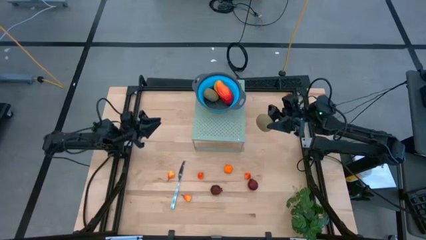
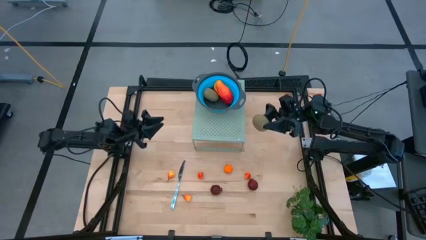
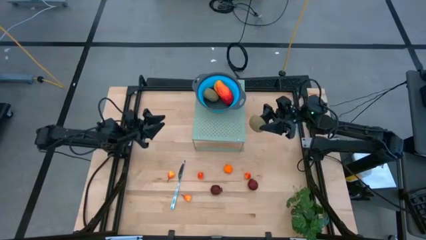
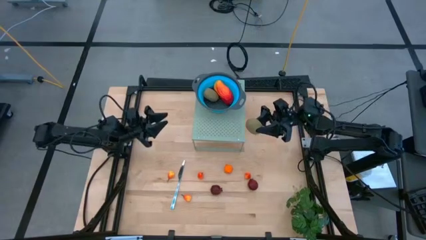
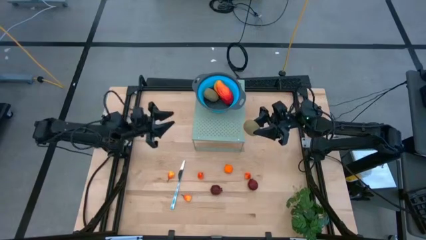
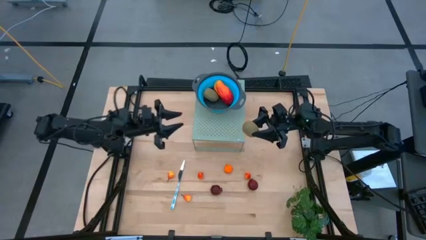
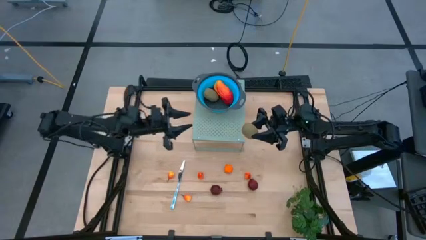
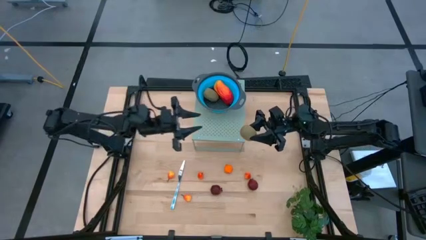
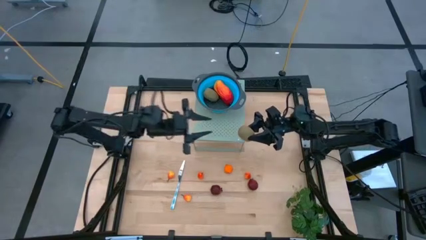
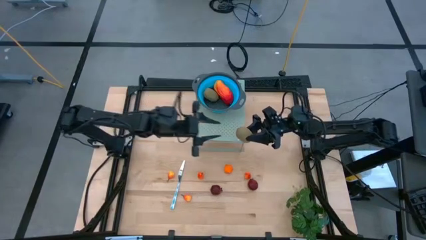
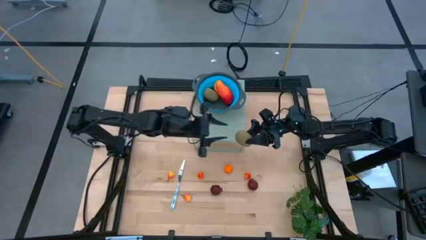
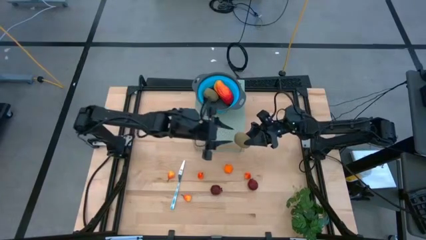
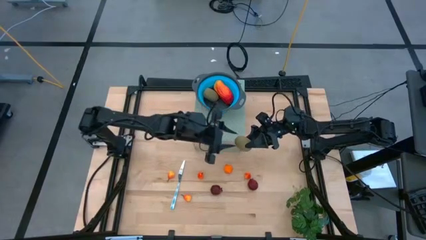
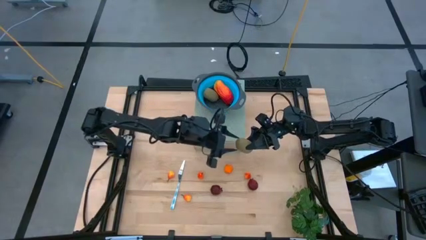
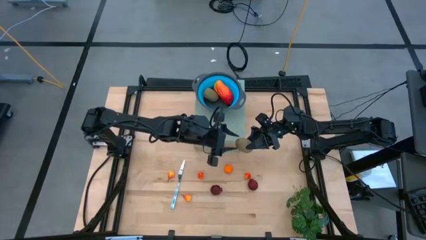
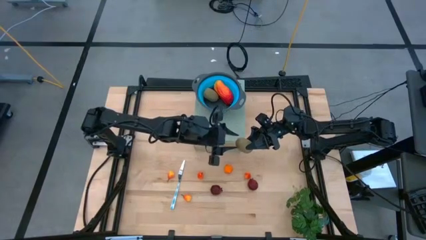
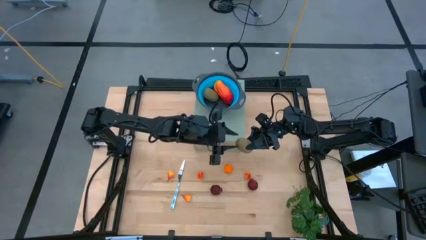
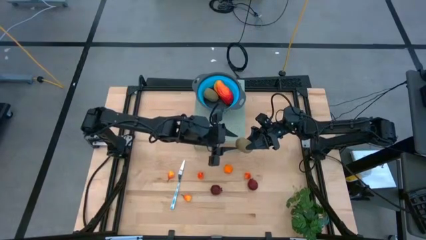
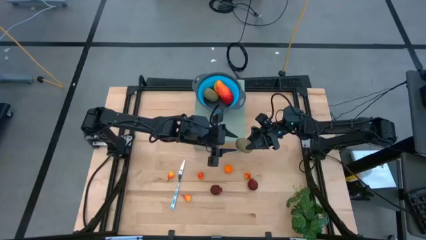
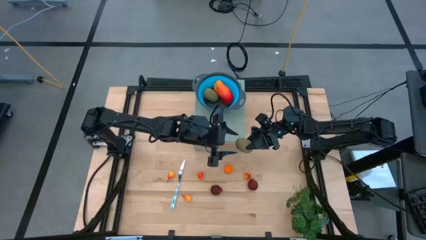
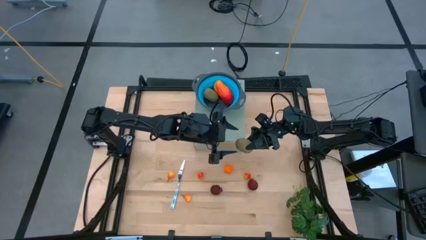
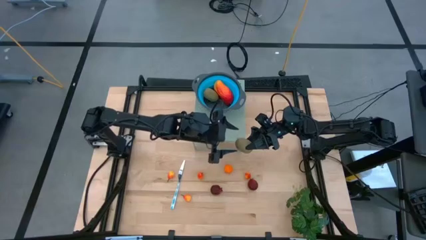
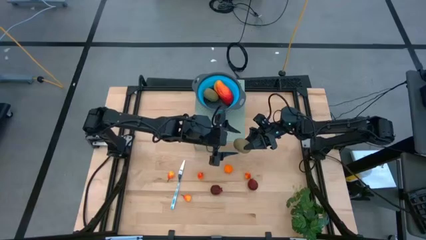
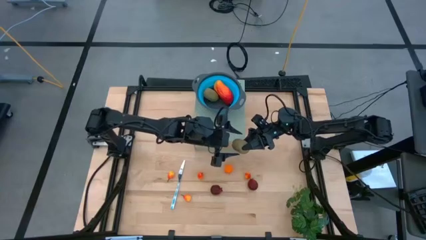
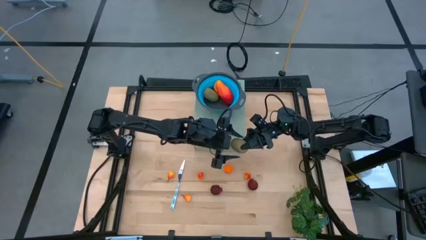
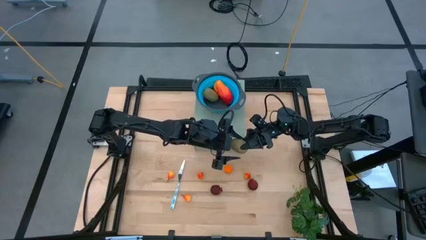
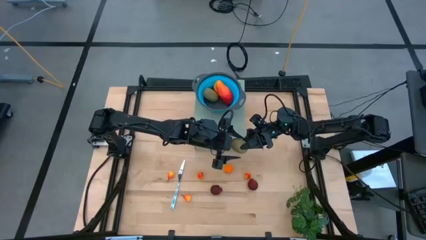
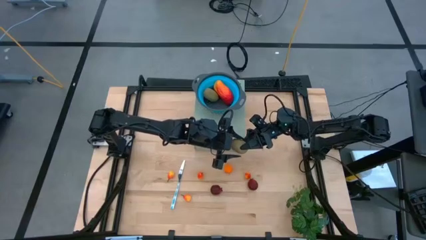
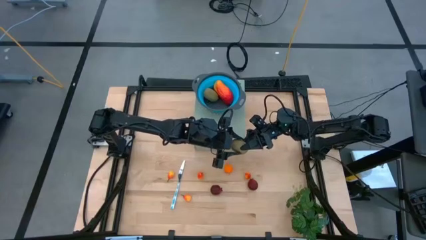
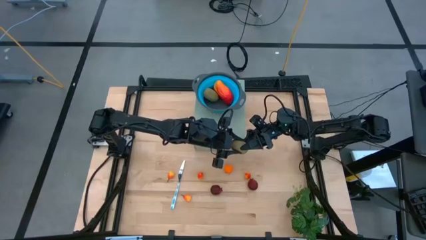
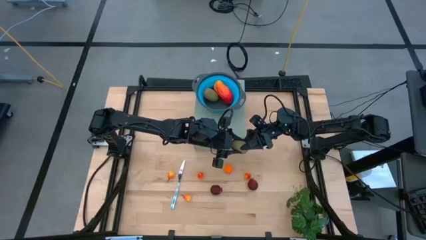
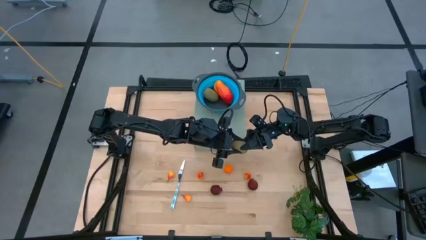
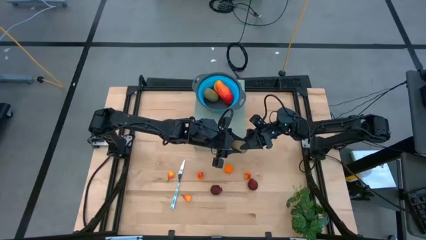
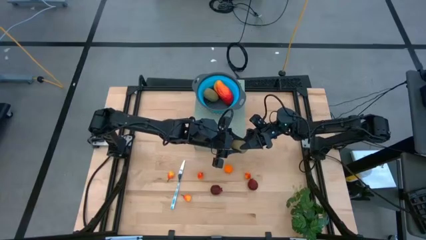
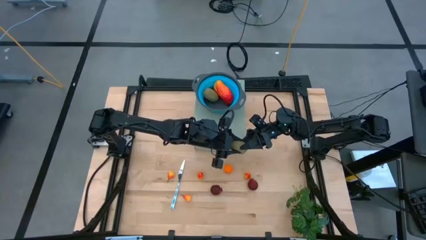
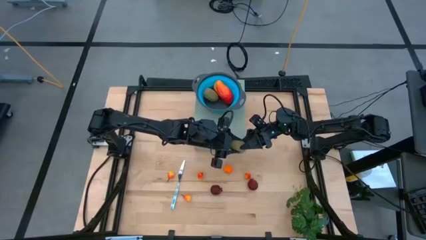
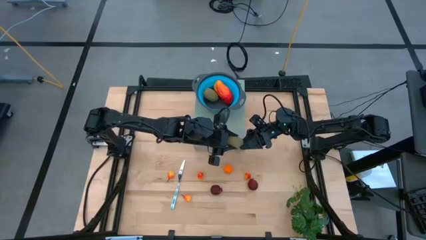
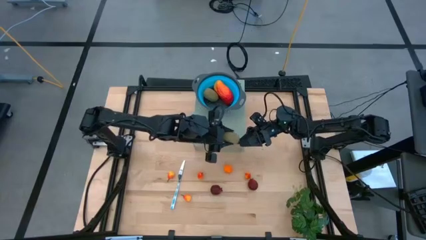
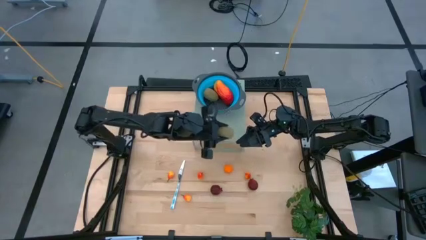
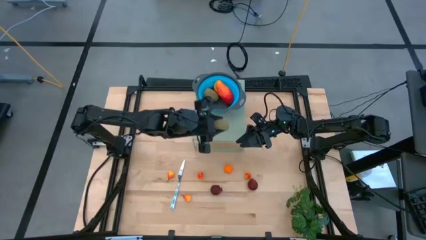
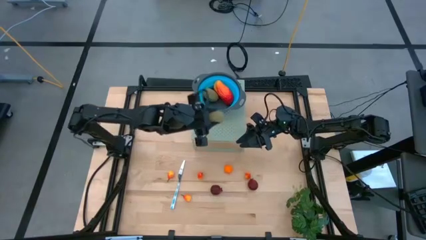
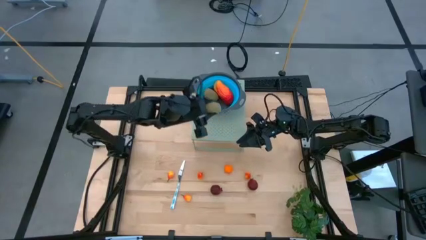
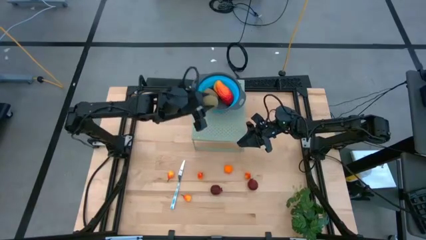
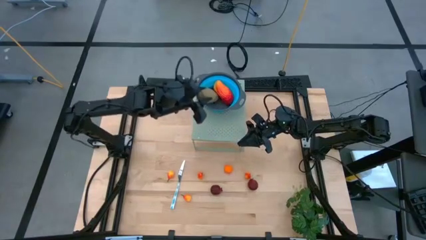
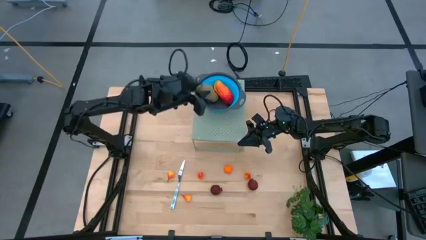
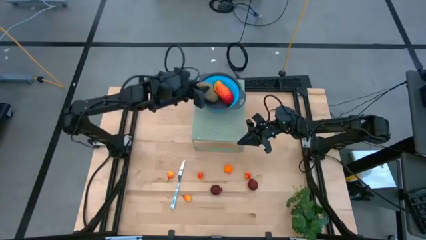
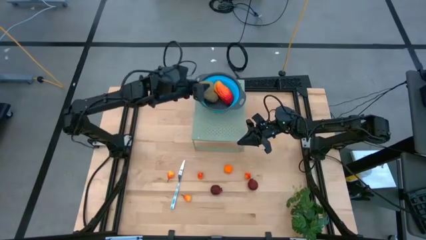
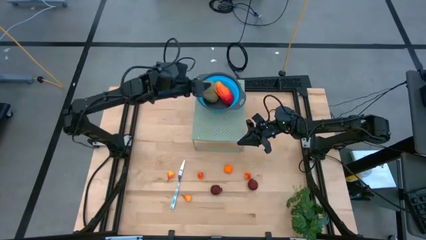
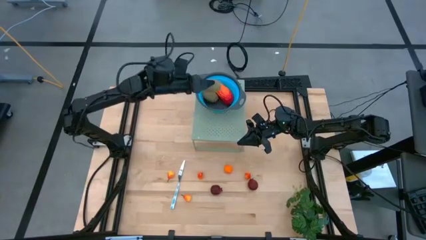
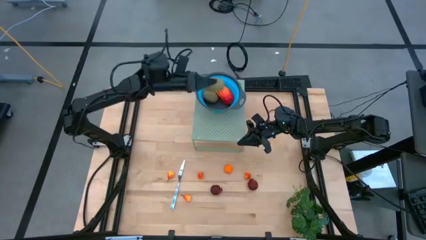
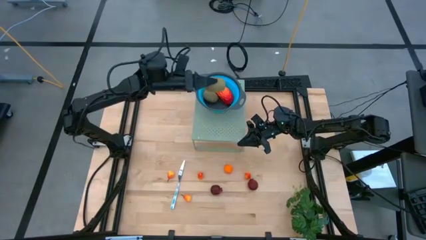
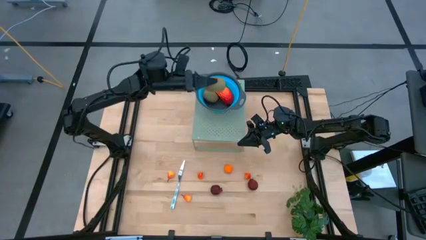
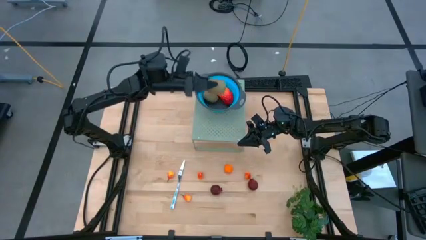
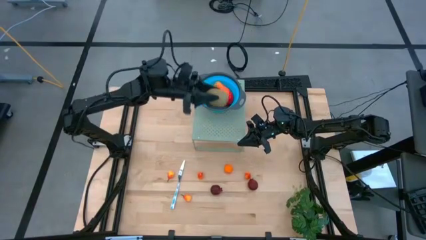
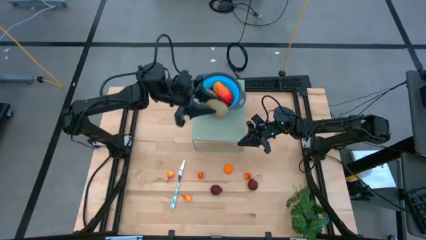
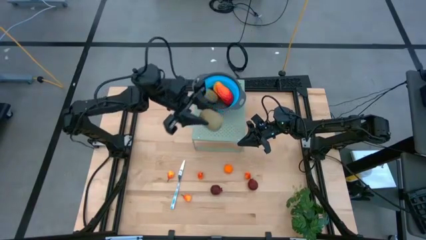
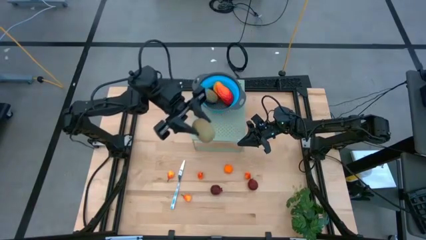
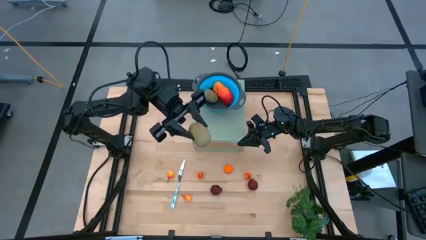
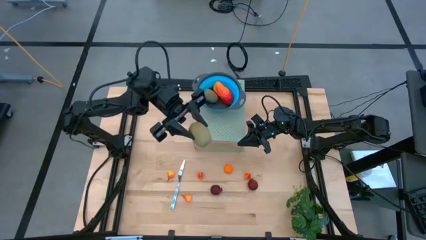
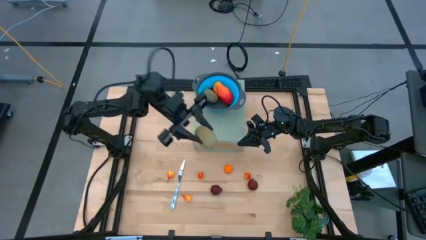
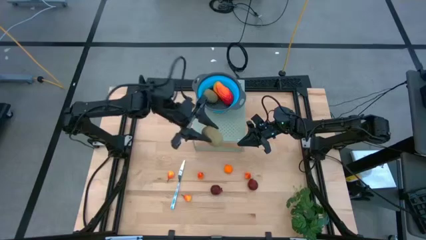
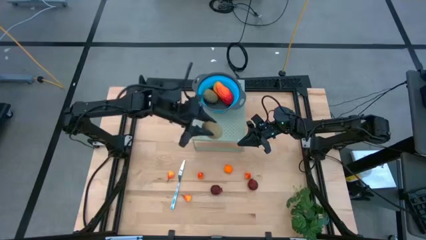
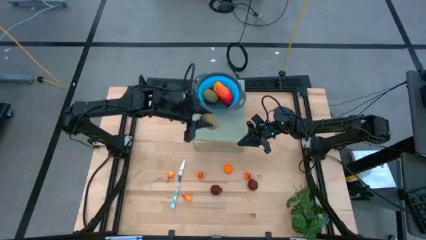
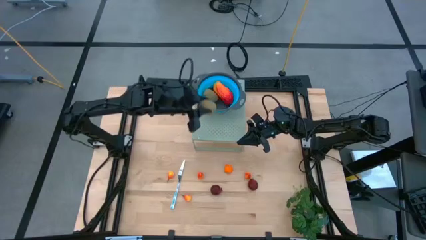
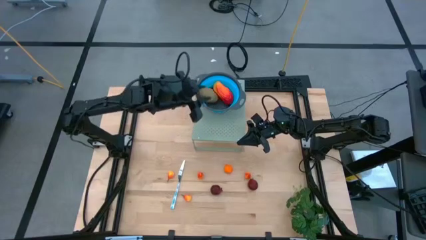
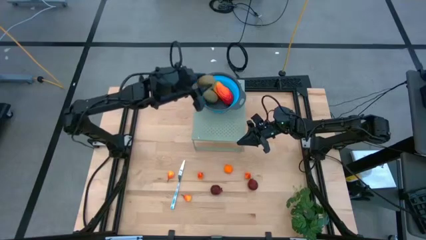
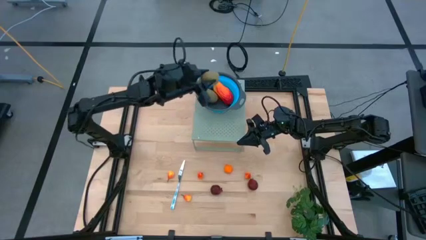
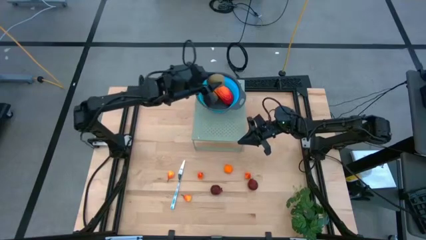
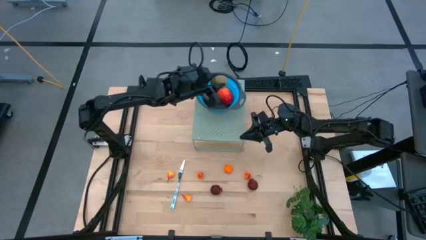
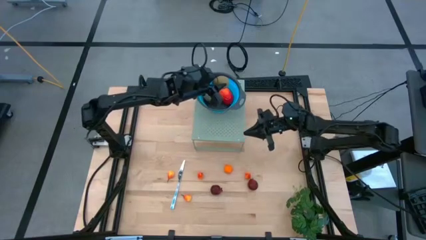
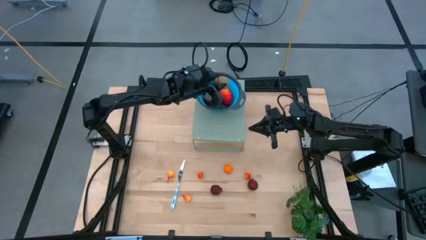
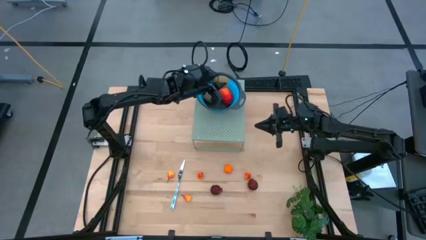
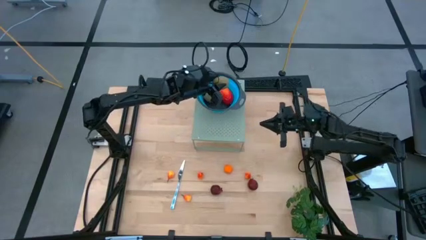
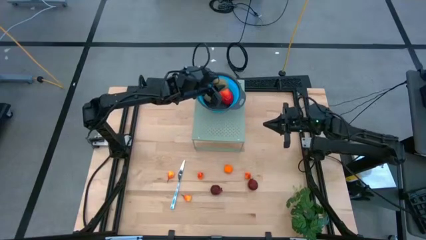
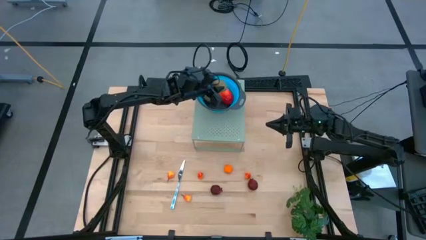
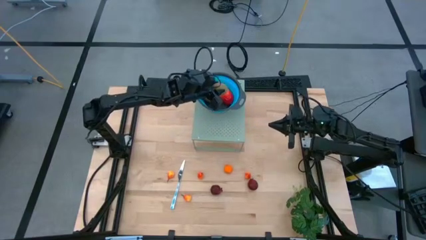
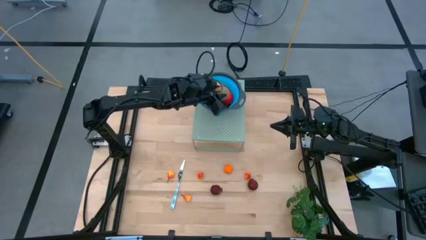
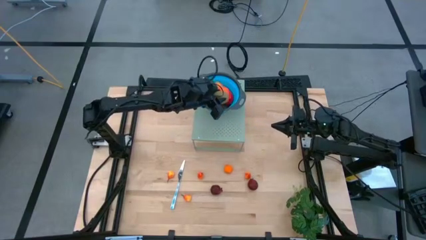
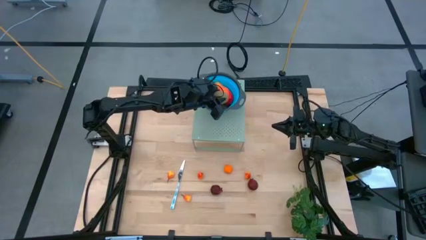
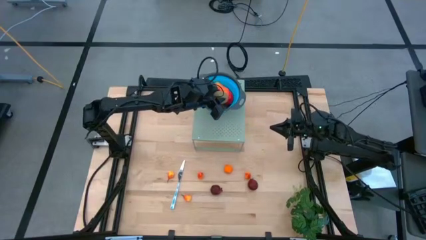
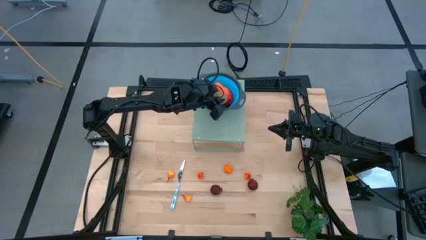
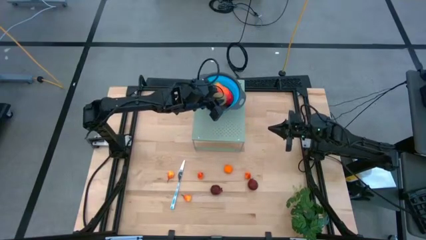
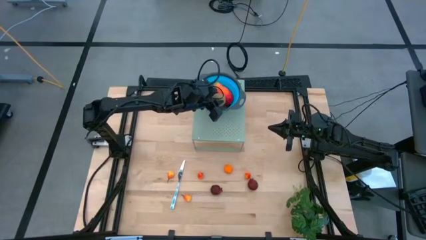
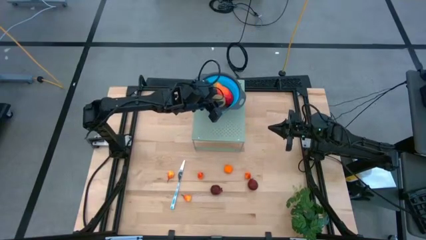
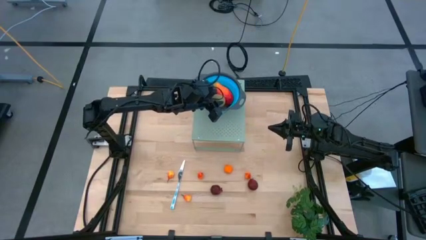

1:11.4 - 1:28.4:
Task: Pick & Place Fruit
Put the kiwi into the blue strainer bowl on the shelf
